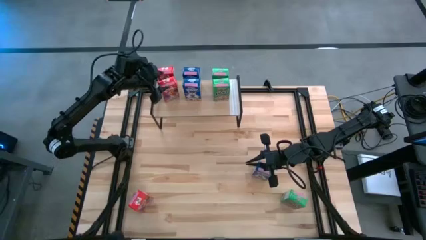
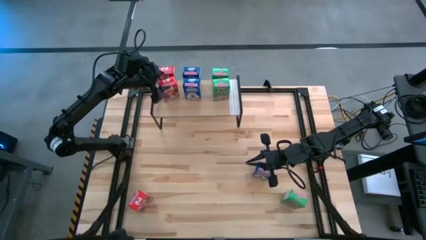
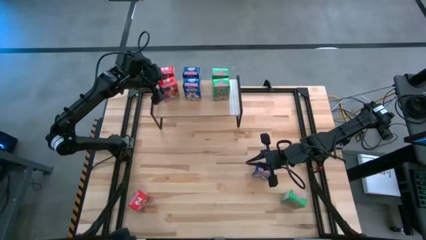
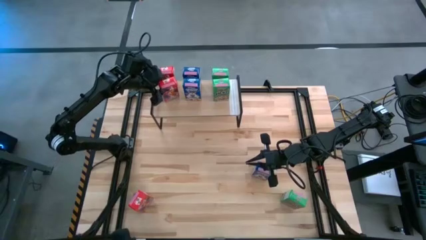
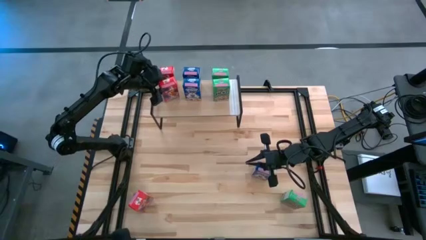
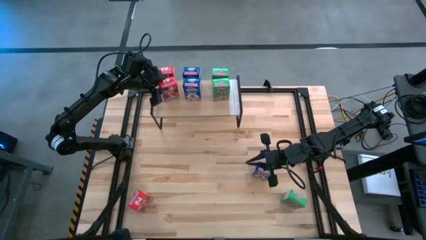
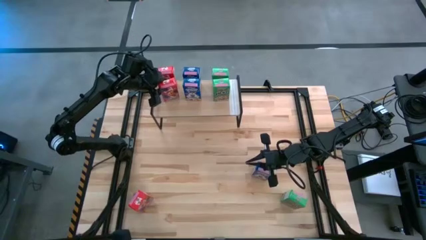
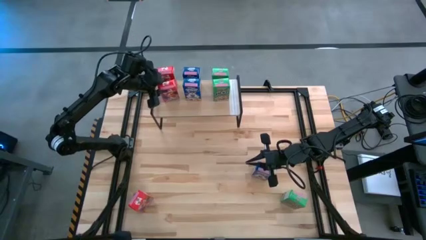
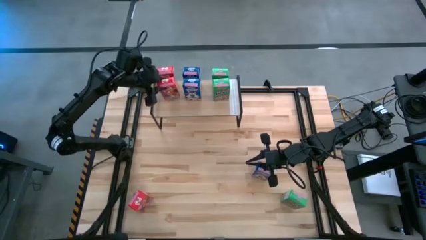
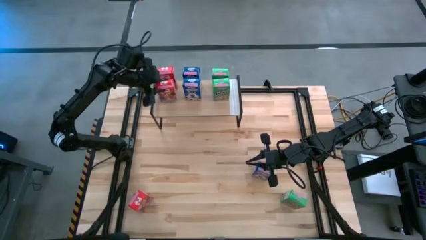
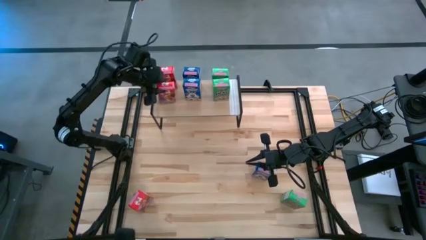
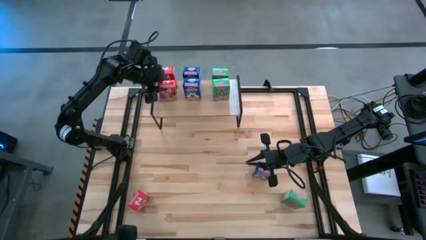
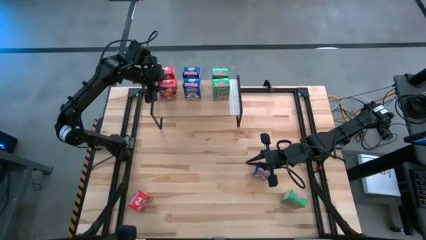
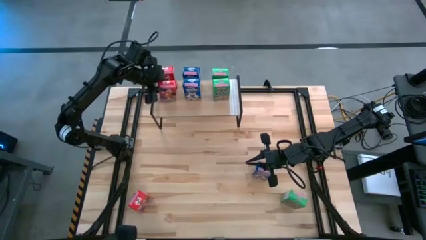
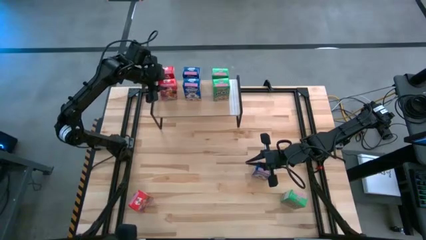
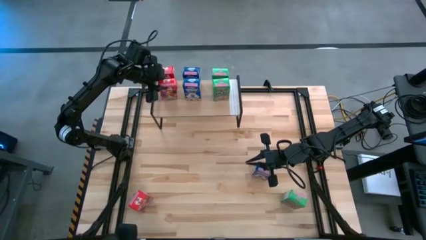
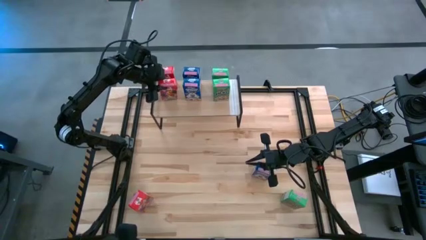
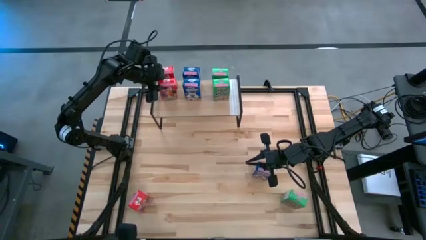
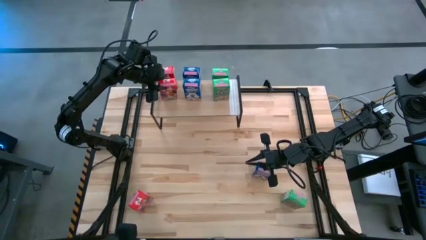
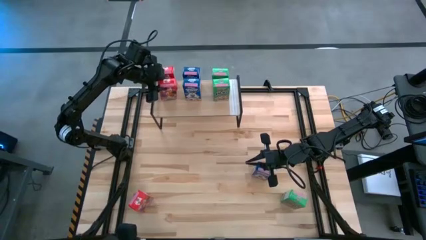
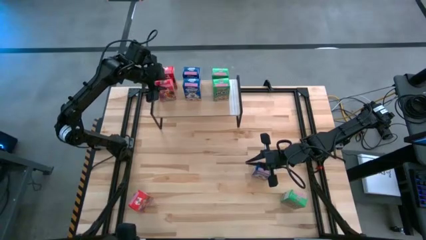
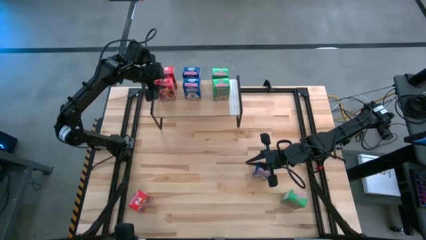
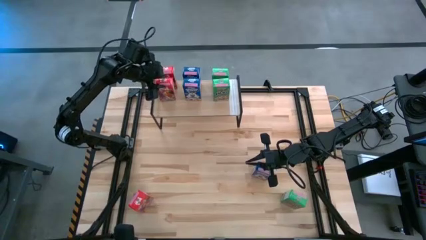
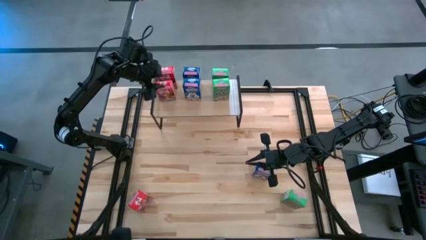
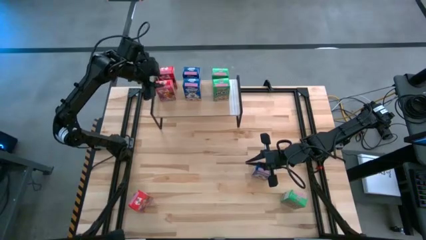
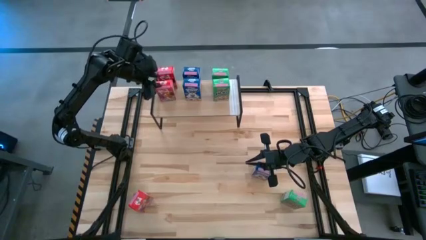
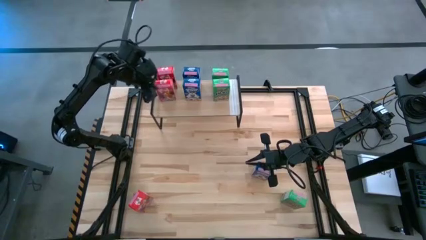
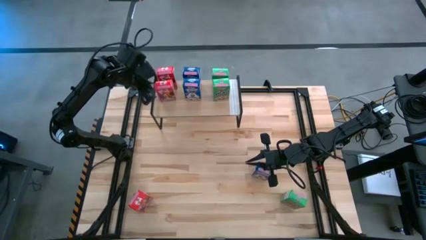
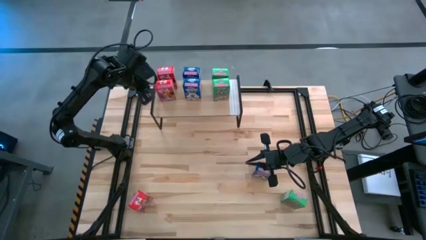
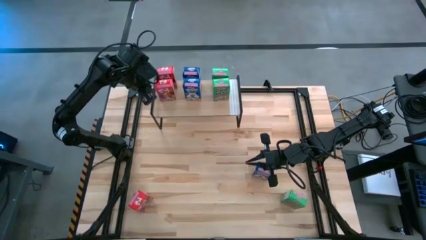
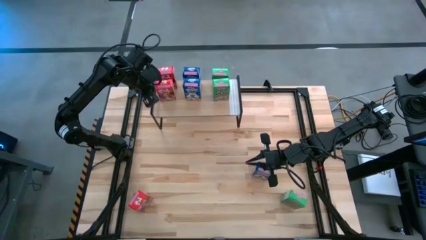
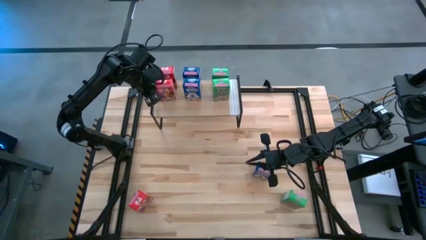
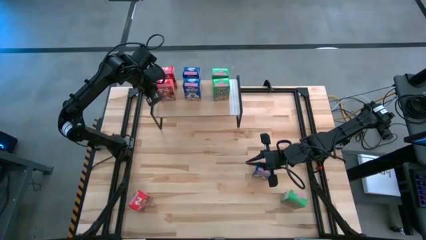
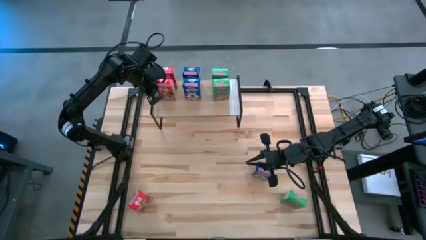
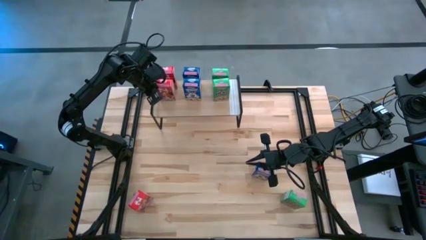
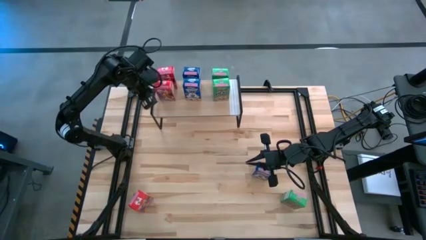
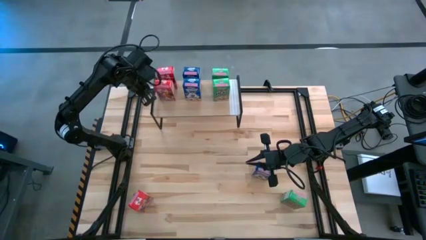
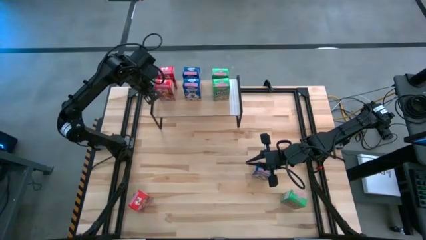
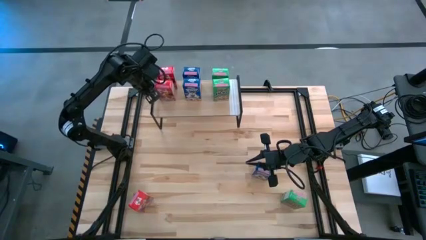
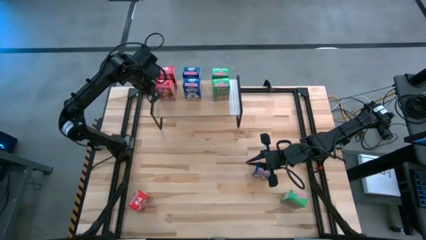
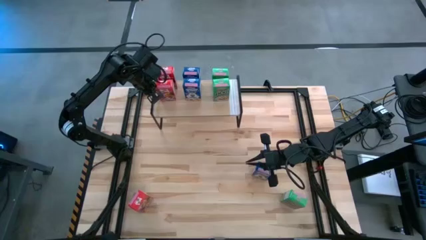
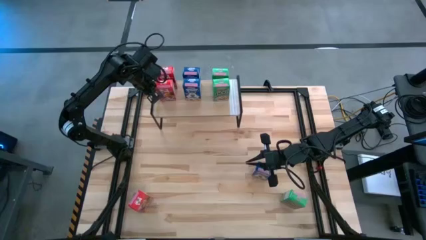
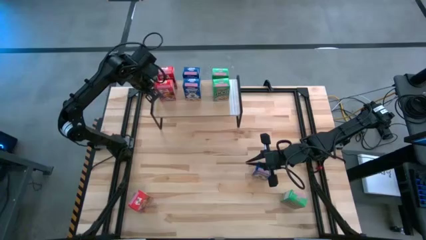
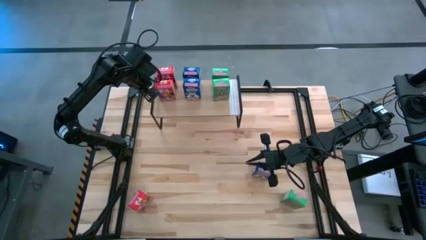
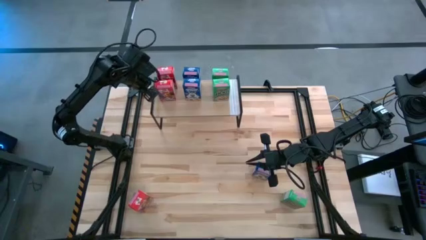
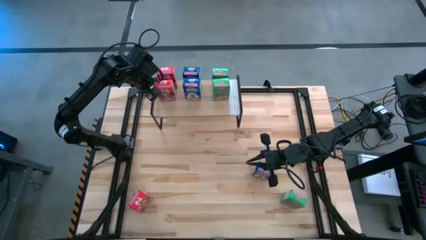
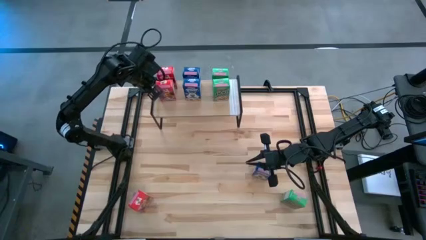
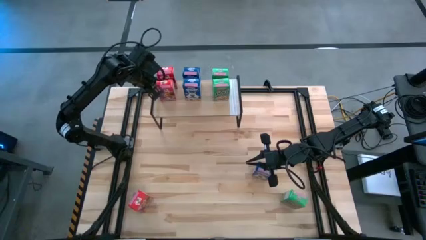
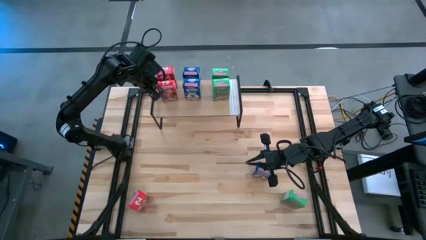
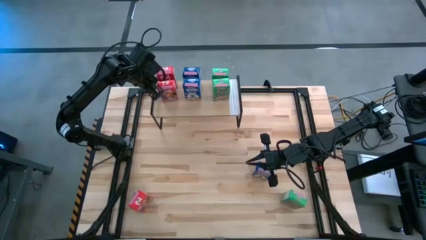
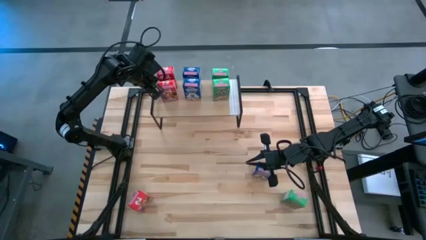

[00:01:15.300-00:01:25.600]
Task: Stack cereal on shelf
Put the right red cereal box on the shelf aligned with the red cereal box

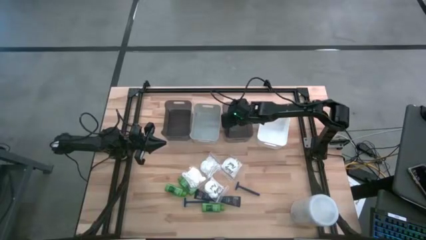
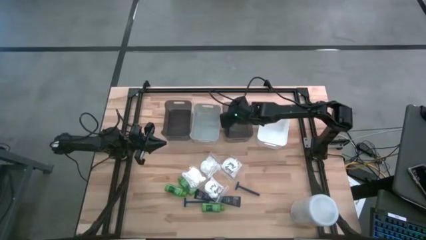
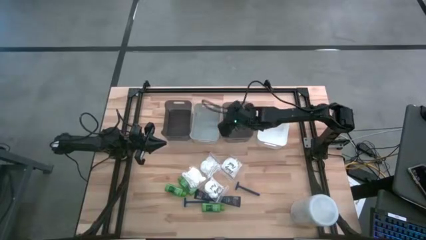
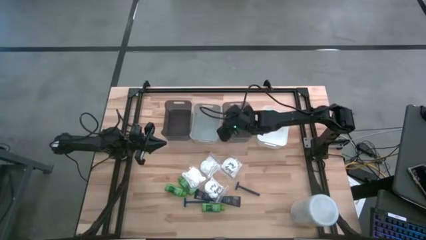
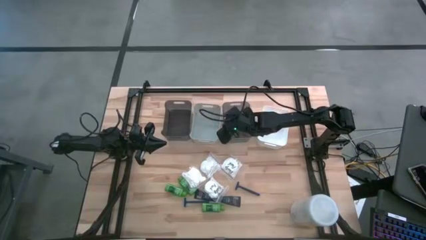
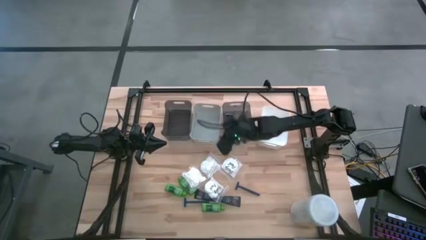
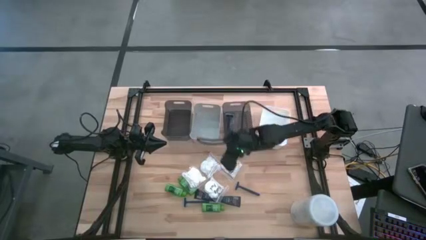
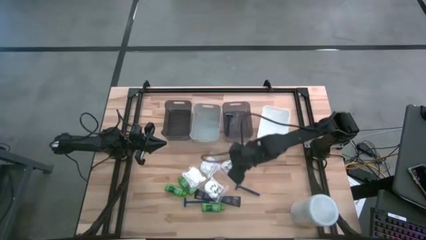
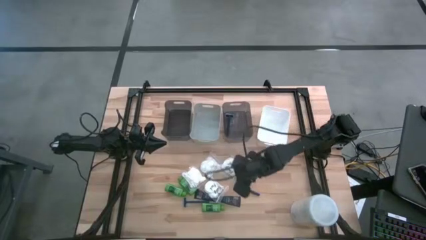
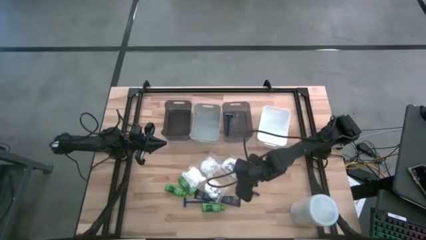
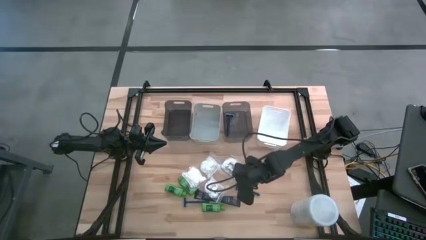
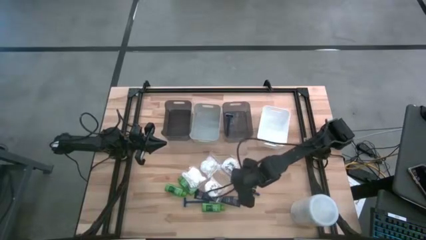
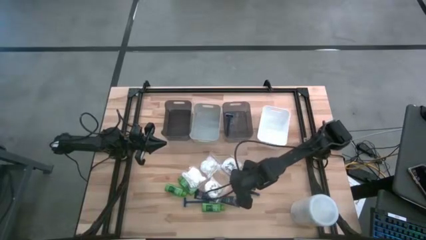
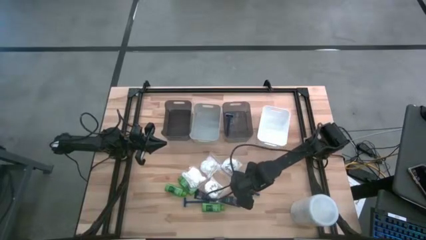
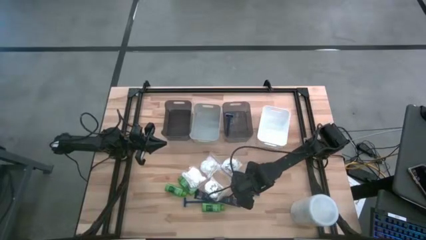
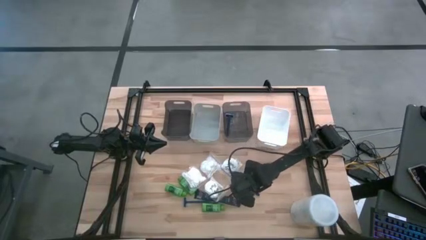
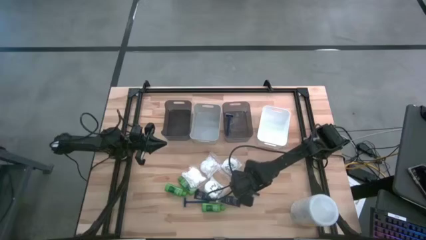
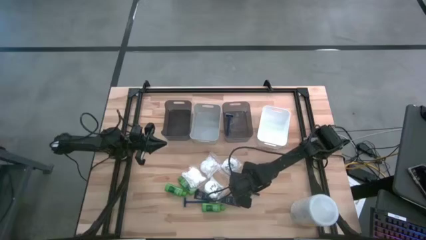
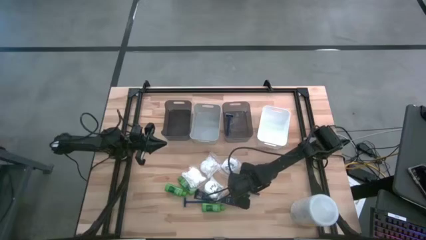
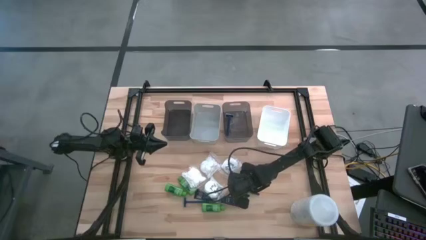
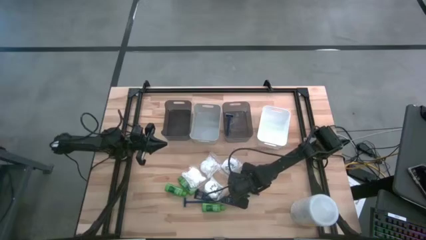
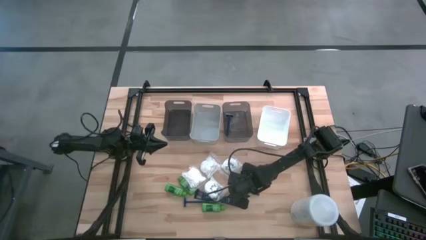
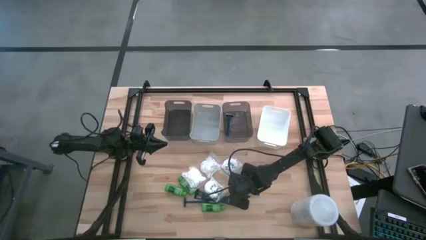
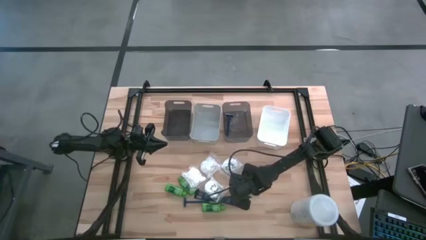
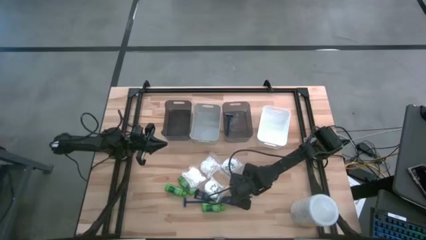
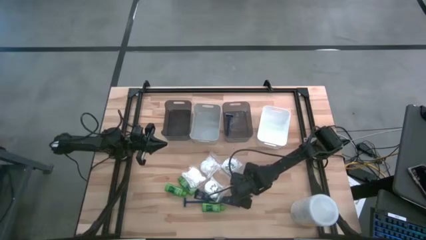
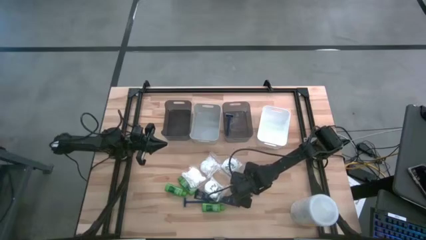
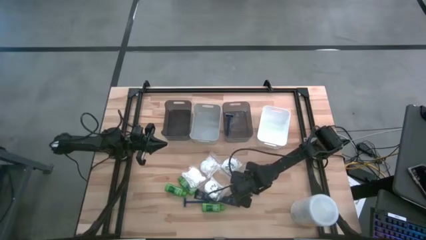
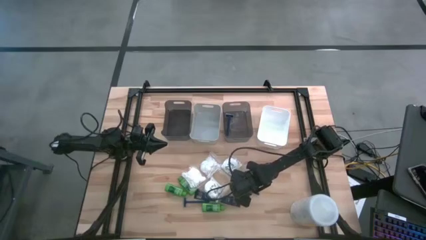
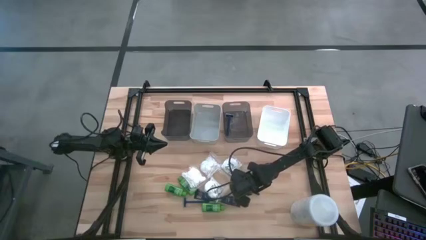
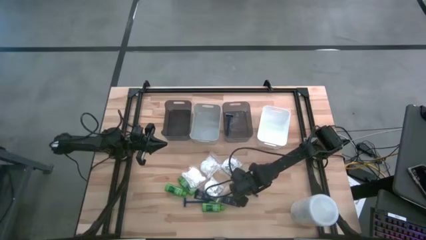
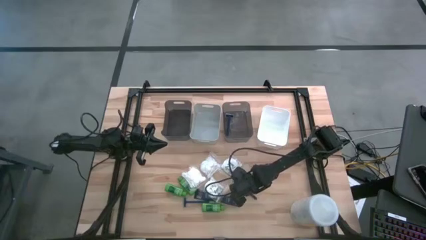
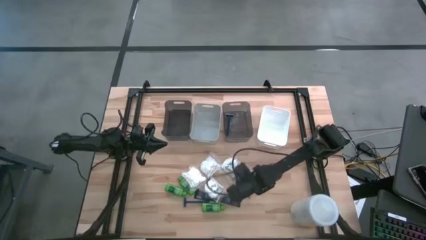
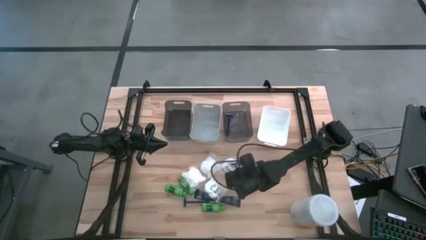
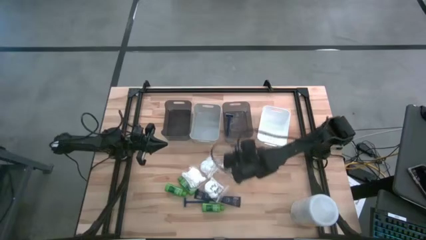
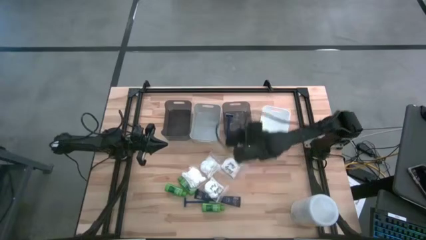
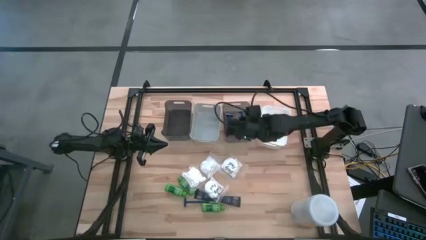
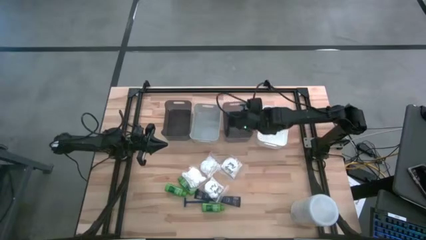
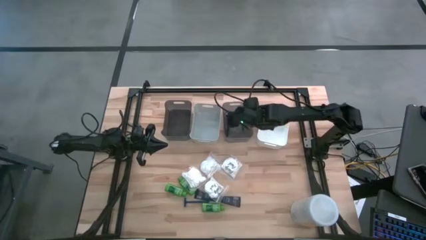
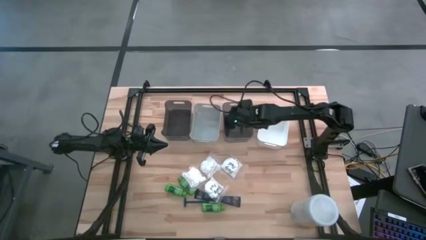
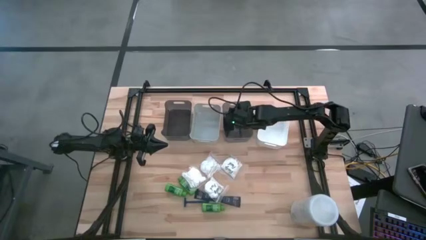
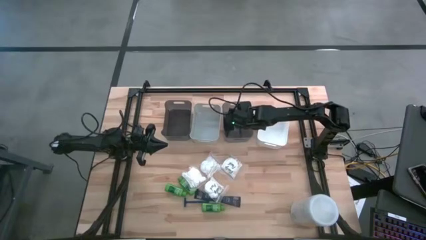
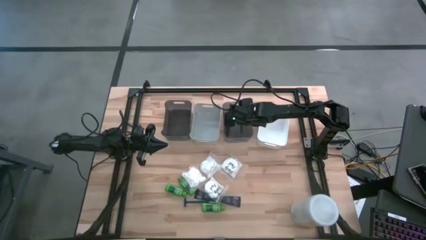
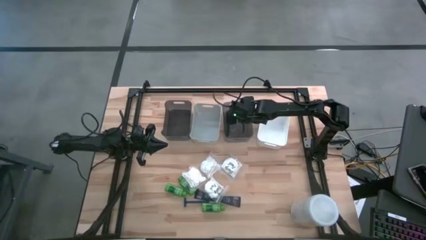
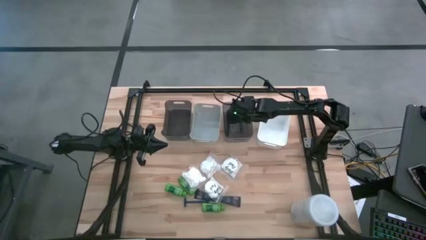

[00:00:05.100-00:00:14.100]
Task: Pick & Place Travel size toiletries
Put the blue razor into the right black bin
